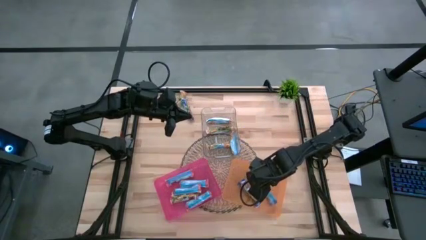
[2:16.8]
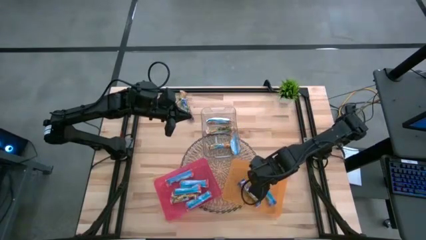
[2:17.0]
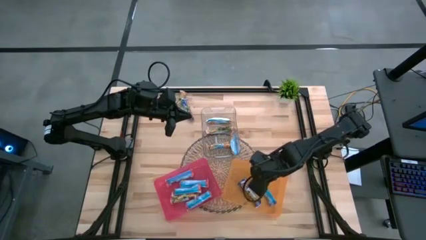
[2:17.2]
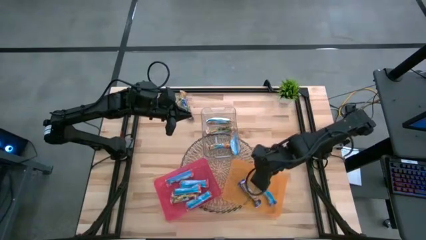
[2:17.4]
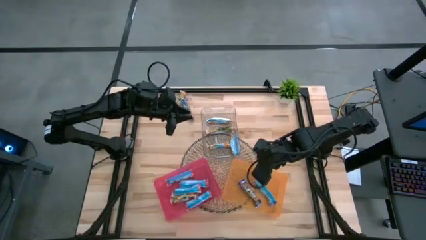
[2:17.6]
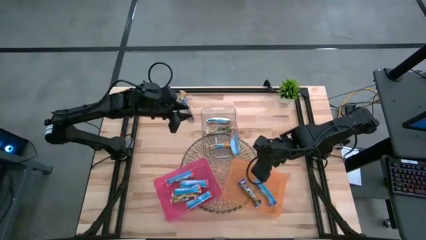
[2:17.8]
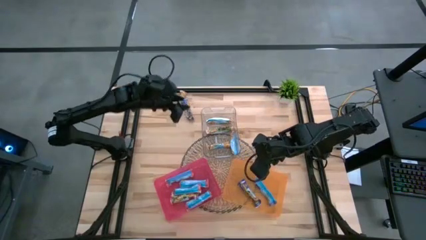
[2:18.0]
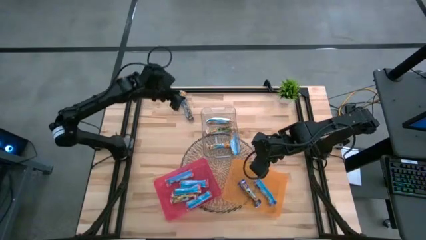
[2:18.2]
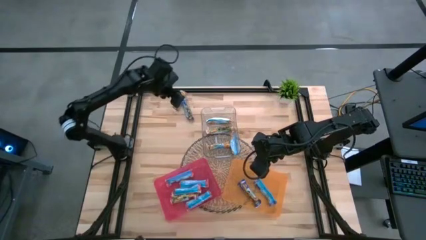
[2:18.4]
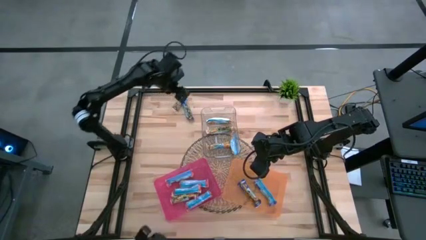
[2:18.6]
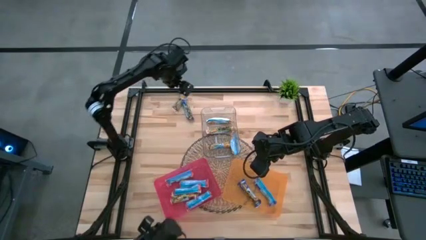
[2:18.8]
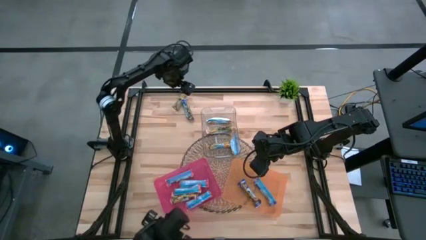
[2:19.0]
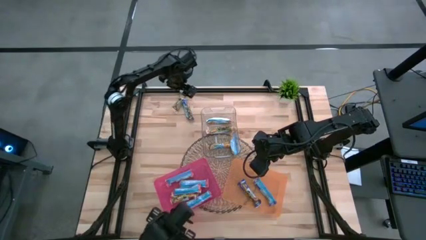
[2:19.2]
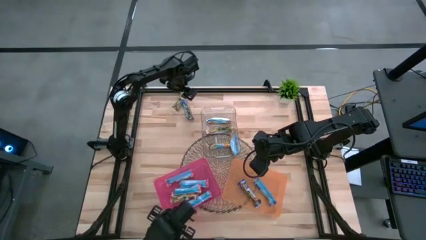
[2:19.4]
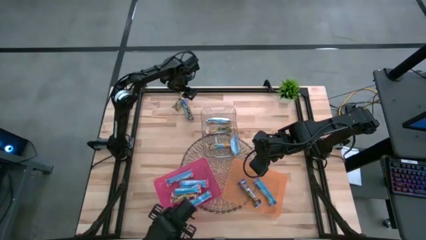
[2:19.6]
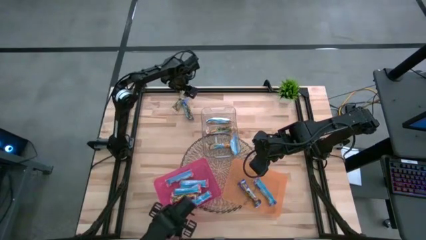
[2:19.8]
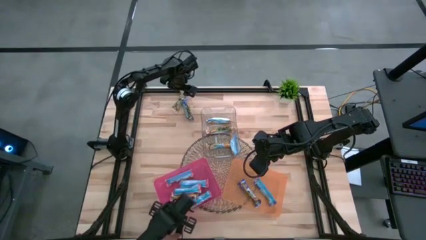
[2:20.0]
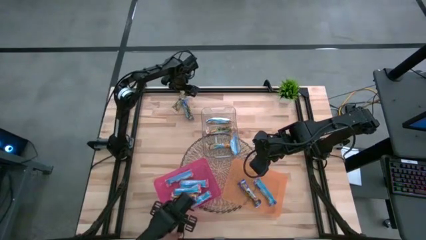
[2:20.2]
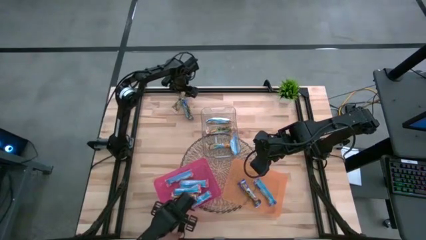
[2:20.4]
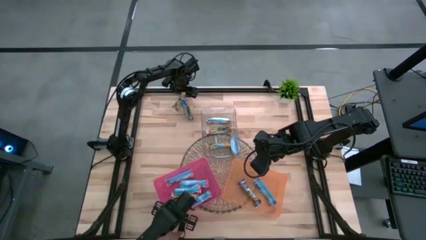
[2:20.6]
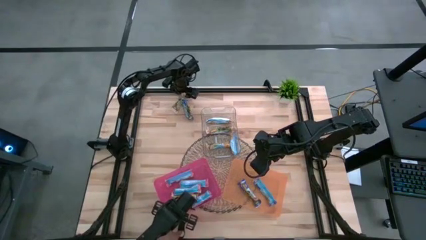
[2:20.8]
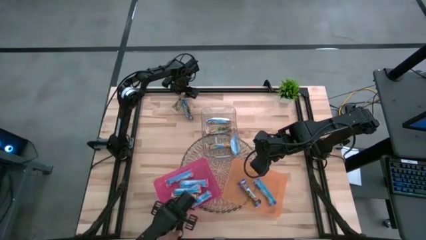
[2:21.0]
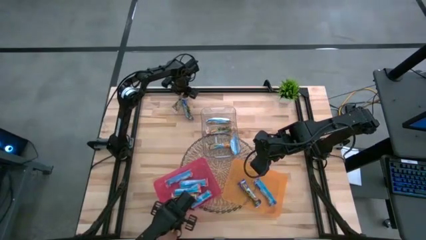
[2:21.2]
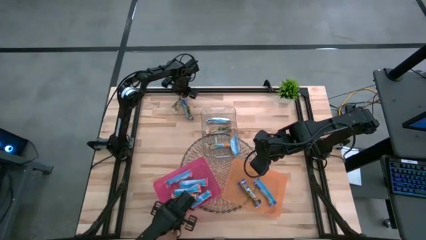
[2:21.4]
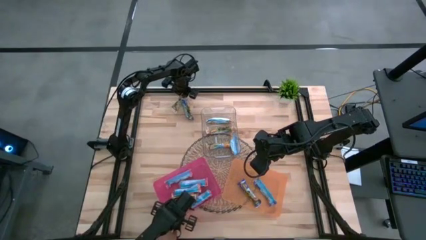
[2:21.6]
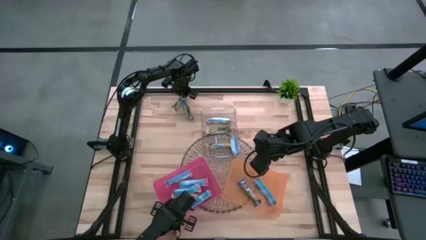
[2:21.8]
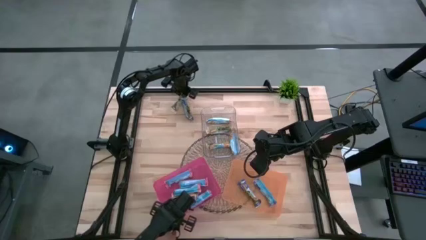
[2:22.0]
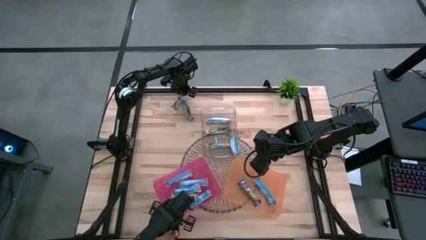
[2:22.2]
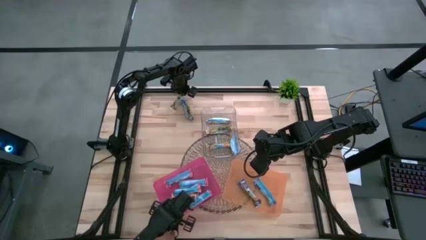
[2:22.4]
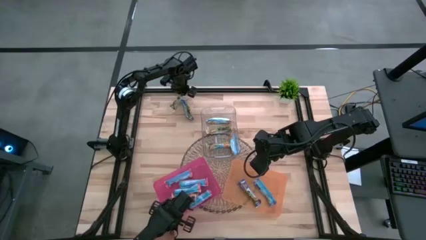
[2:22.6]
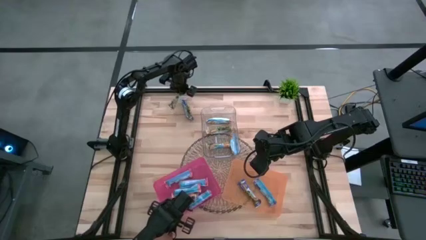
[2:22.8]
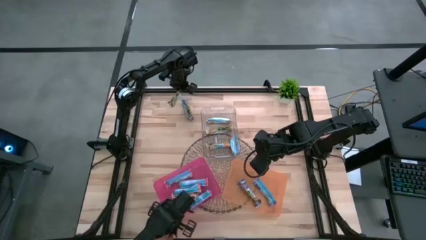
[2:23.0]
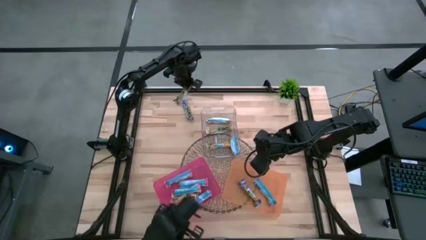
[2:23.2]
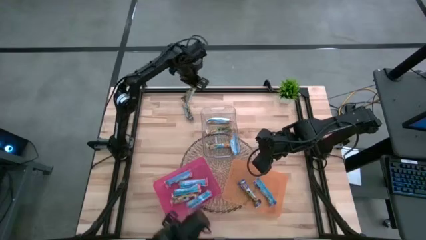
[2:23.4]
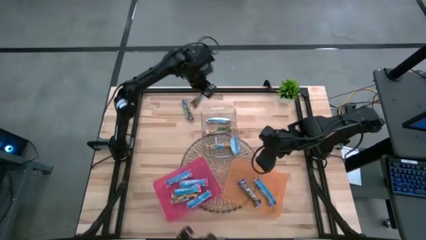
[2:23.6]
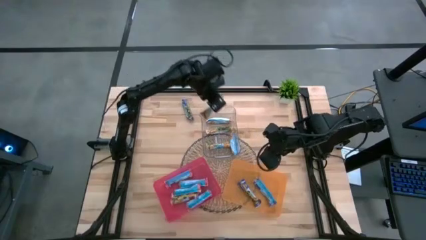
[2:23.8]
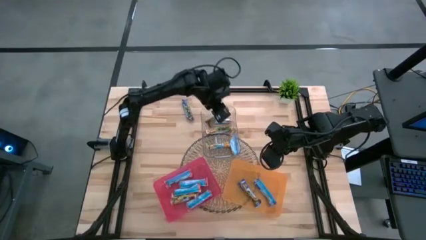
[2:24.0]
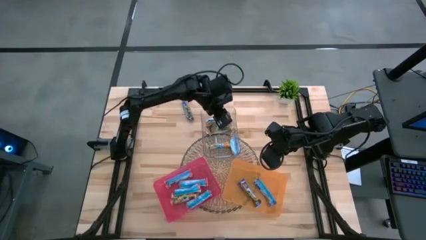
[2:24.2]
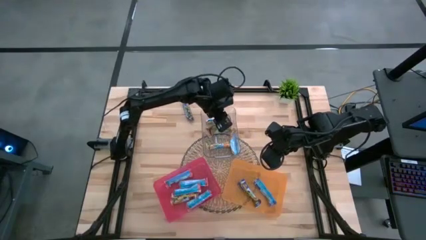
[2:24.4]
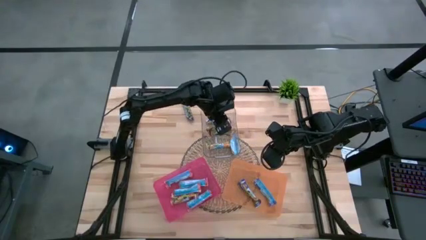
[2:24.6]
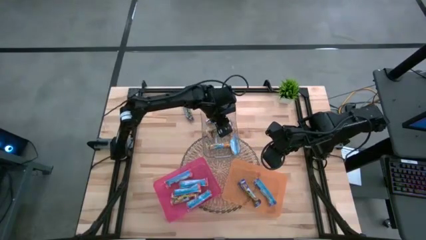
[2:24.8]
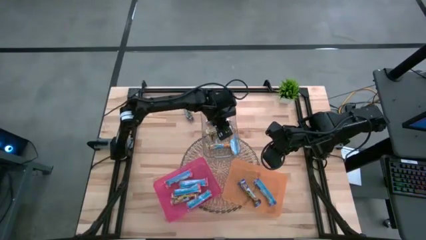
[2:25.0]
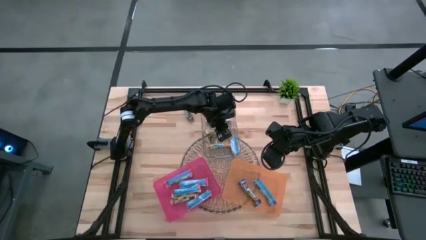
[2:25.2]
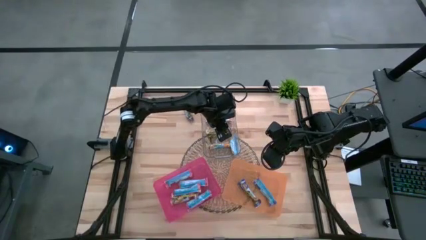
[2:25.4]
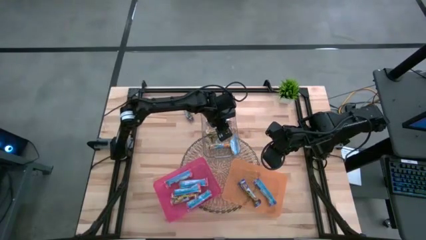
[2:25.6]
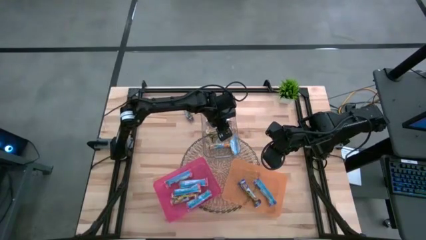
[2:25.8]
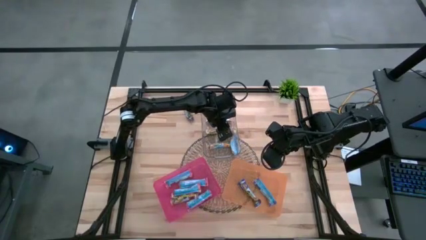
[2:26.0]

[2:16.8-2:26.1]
Task: Pick and place Granola Bars by type
Put the orange granola bar into the transparent bin

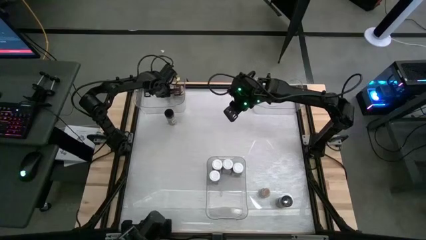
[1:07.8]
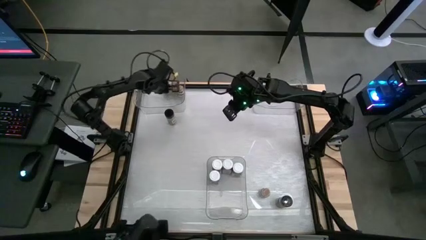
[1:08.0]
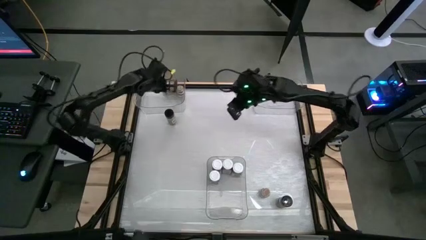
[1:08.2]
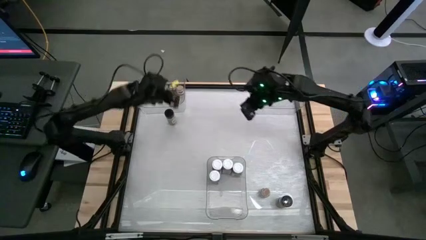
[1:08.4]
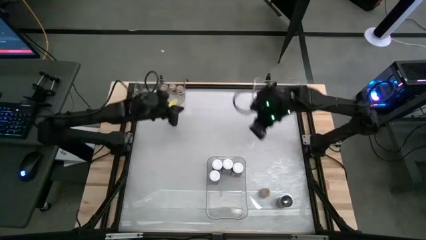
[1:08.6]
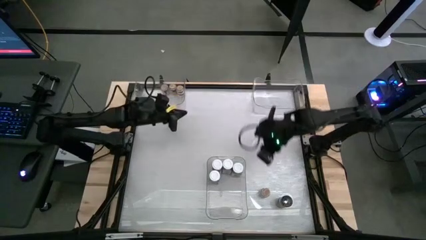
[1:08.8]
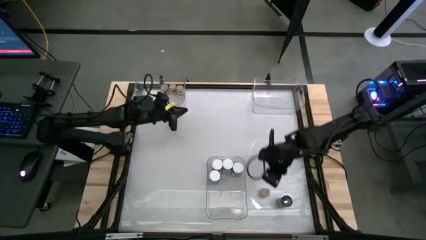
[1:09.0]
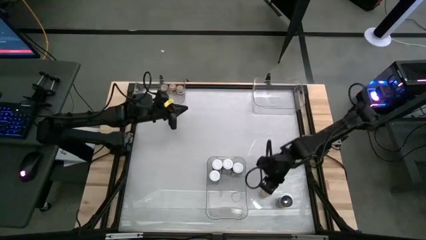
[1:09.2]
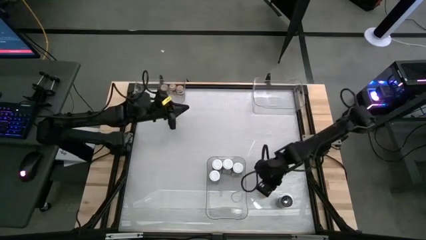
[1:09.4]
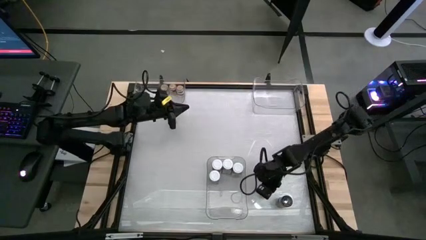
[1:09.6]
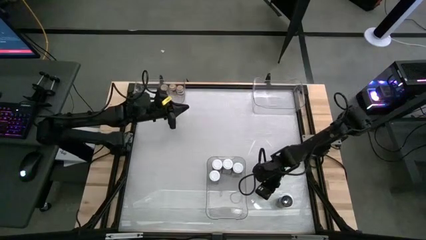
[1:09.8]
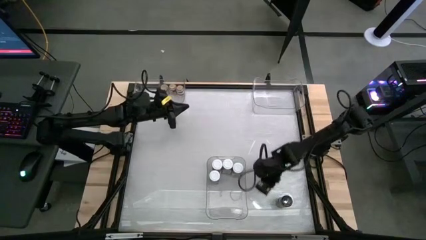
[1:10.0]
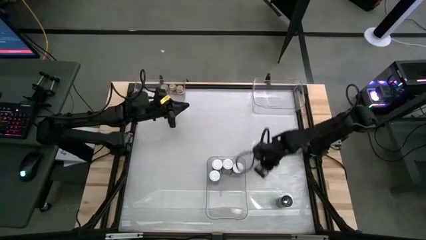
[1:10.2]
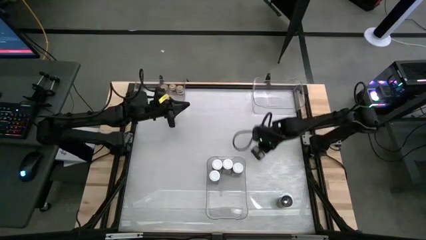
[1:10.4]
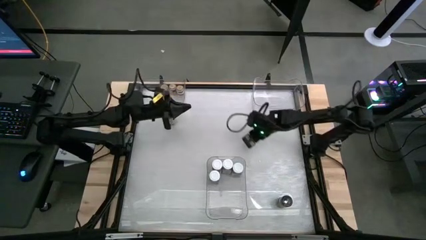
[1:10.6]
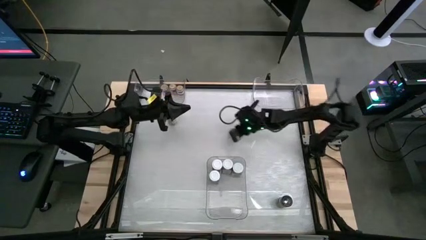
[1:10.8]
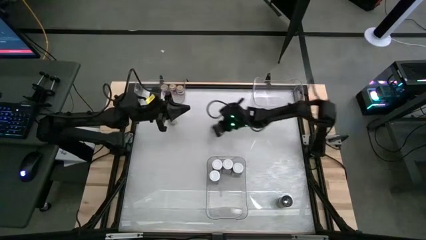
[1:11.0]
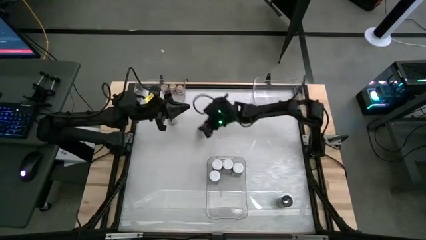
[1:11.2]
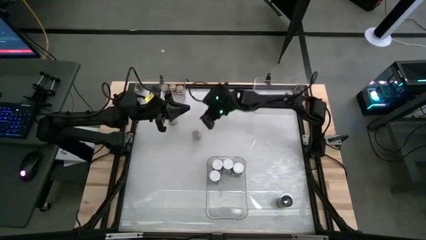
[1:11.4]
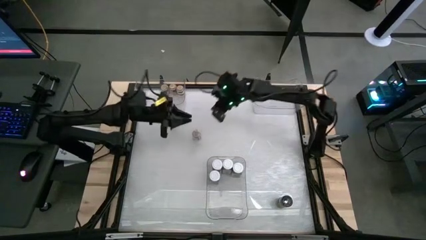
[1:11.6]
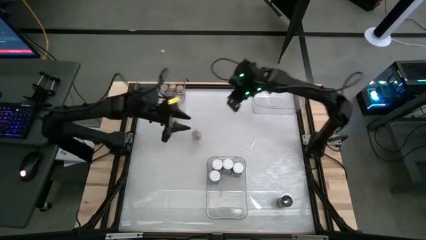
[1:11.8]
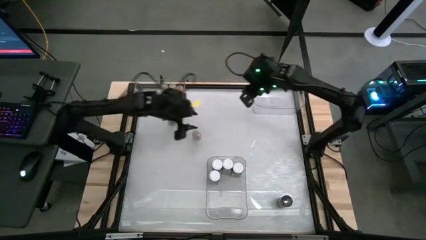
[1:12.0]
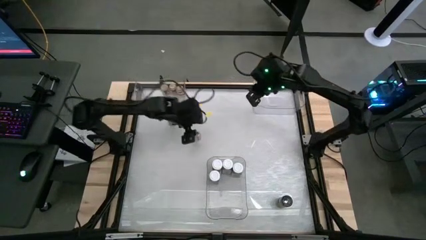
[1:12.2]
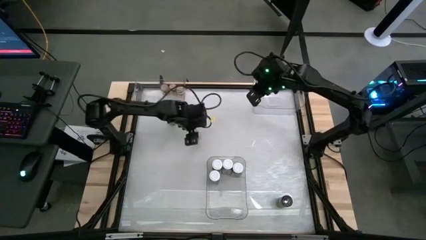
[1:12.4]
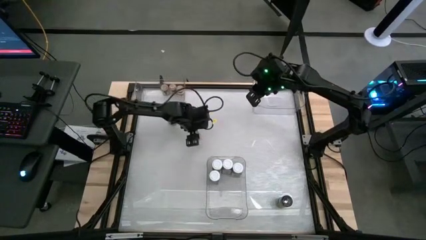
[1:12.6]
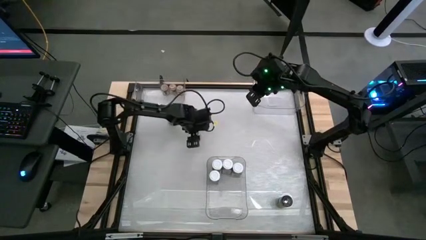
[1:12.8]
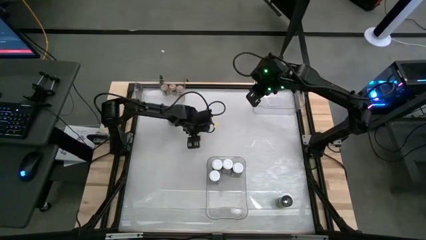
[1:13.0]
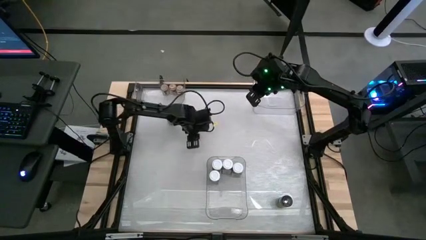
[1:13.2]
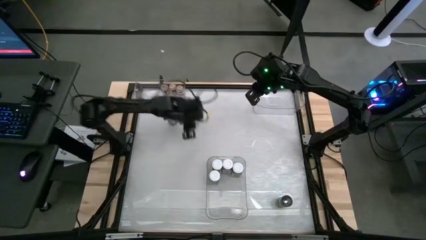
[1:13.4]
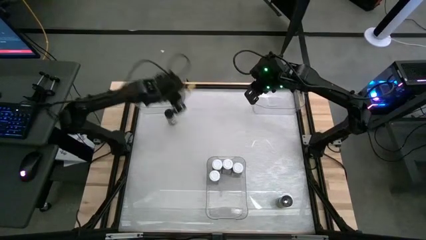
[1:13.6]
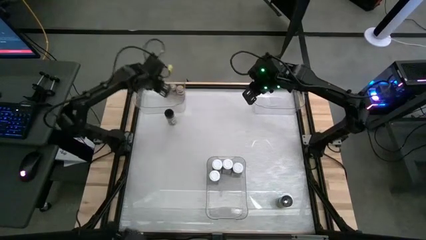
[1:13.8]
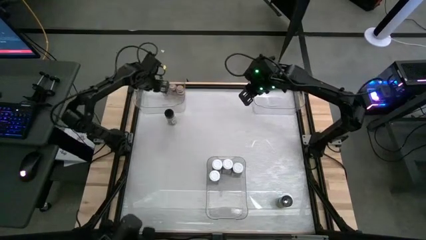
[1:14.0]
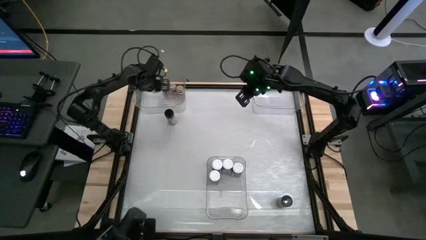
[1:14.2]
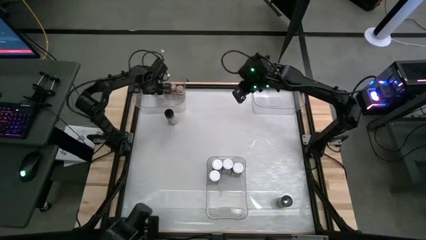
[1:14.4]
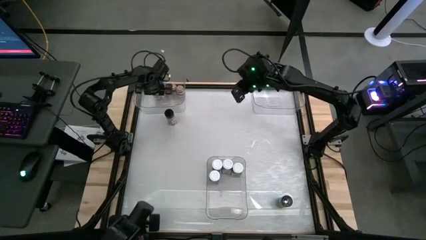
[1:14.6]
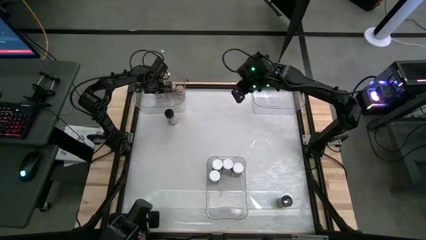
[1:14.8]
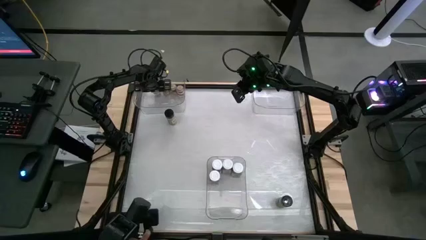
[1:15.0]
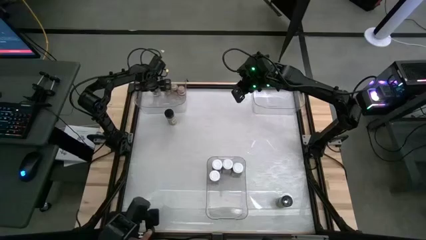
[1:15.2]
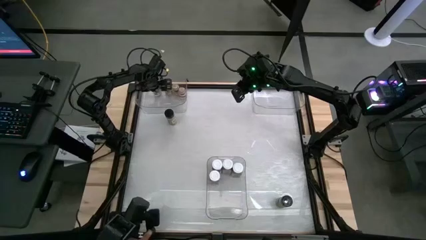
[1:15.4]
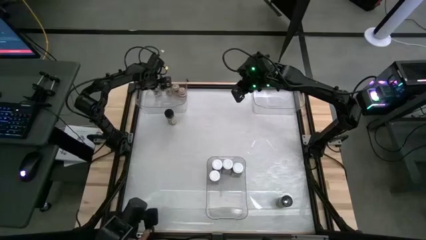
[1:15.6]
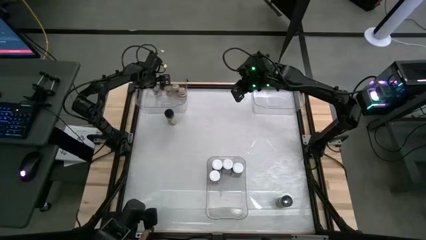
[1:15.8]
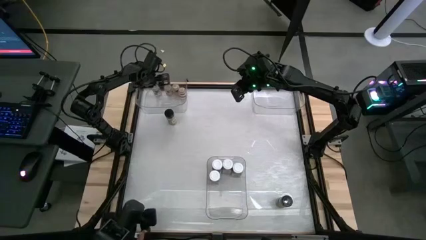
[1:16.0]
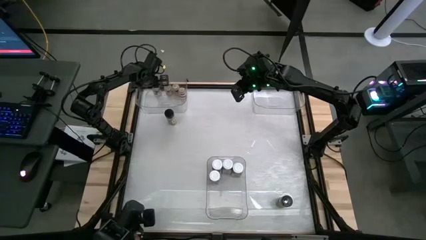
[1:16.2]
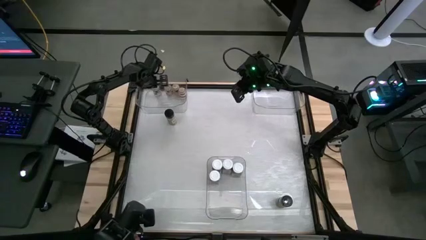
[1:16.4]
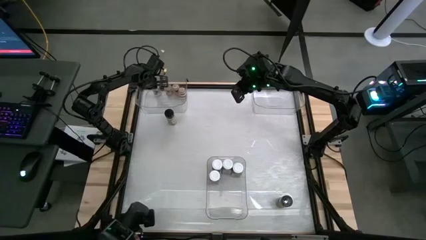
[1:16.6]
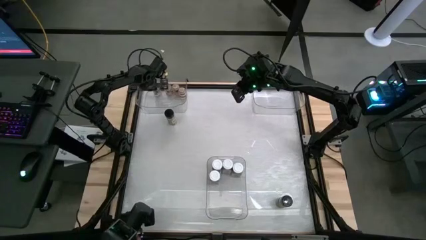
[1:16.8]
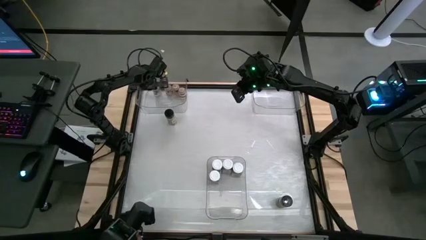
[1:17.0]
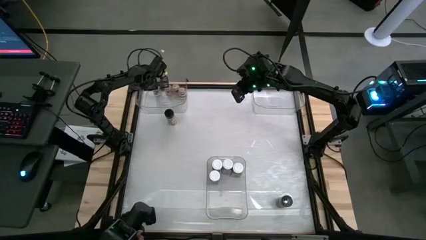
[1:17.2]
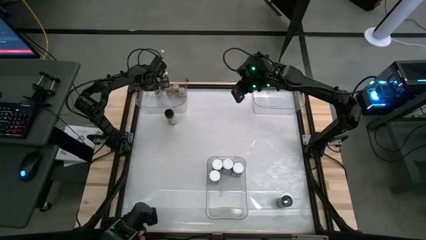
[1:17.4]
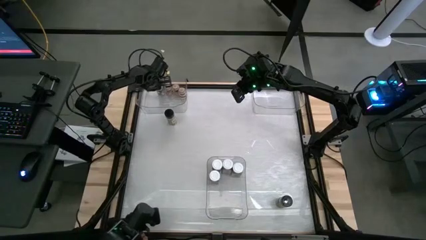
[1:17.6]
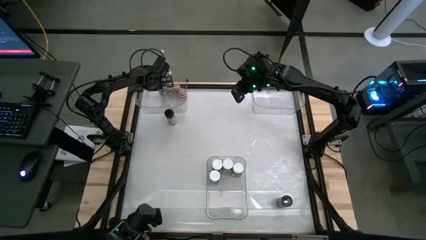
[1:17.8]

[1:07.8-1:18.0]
Task: Sort spices by type
Put the brown seasoning bottle into the top left transparent bin
